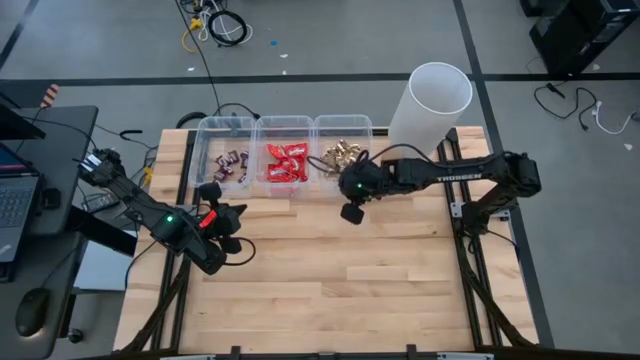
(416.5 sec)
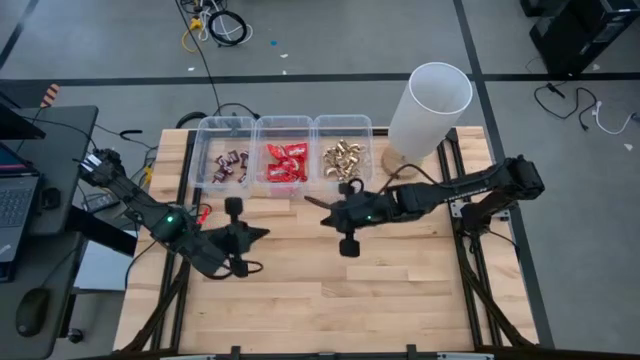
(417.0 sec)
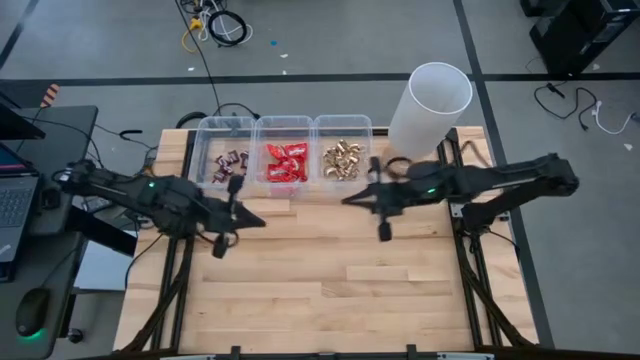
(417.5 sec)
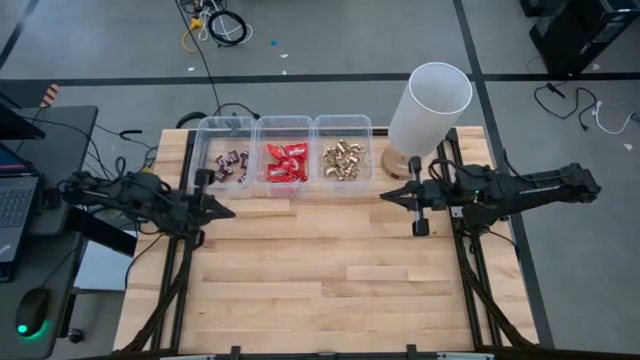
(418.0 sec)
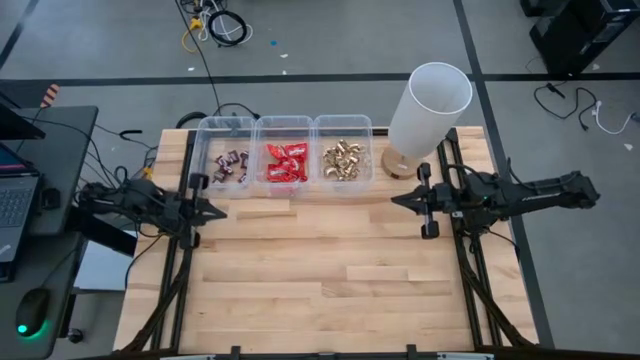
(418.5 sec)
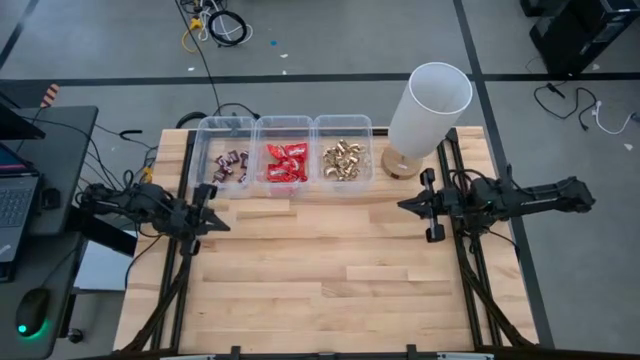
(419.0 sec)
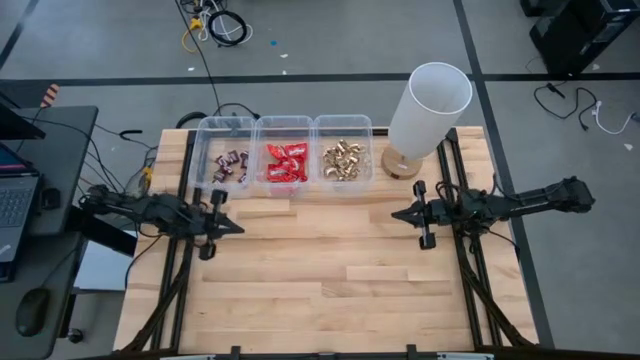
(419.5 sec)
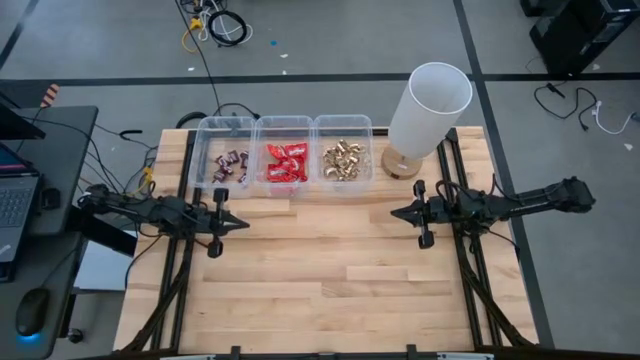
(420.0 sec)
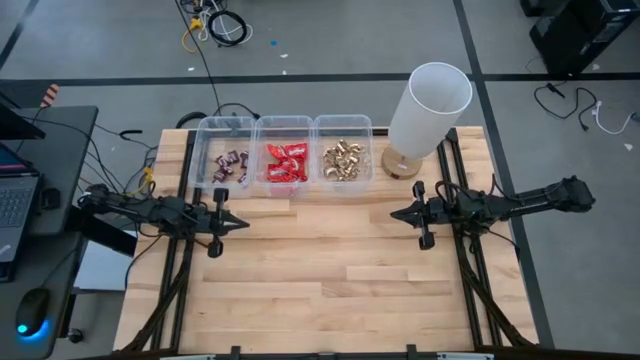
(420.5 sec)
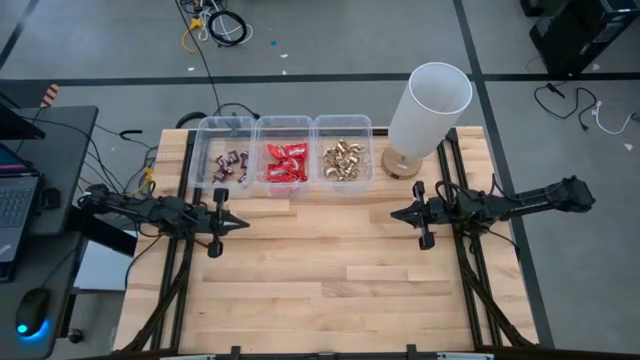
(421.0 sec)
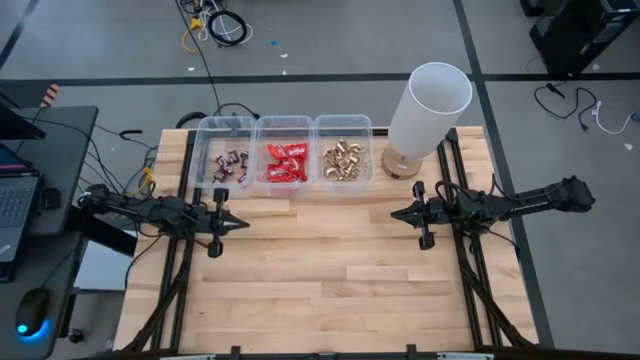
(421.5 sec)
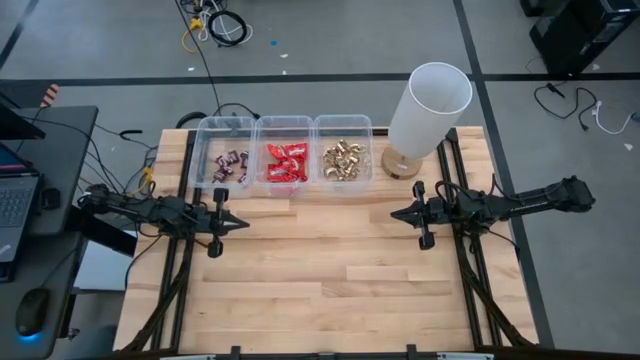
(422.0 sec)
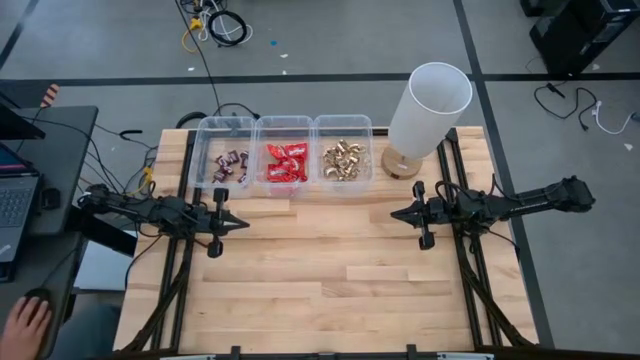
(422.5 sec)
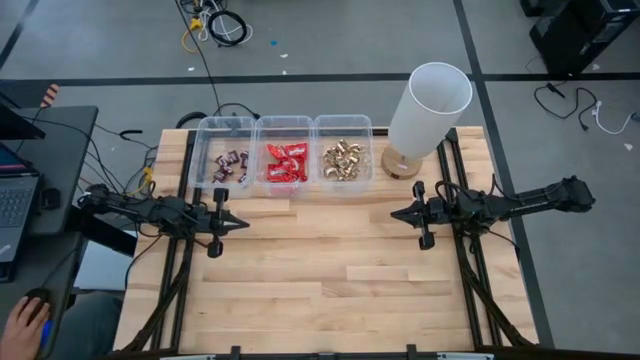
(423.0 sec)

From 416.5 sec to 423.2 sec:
Task: Sort candy
Return to Home Position

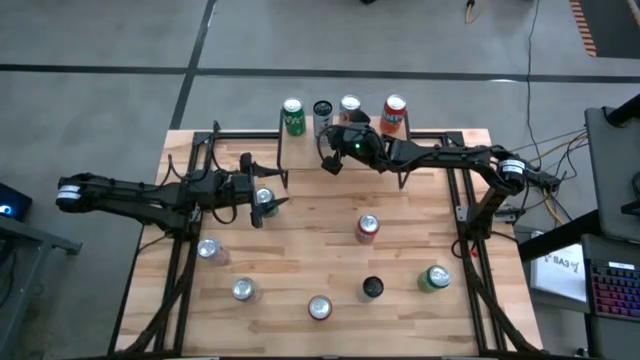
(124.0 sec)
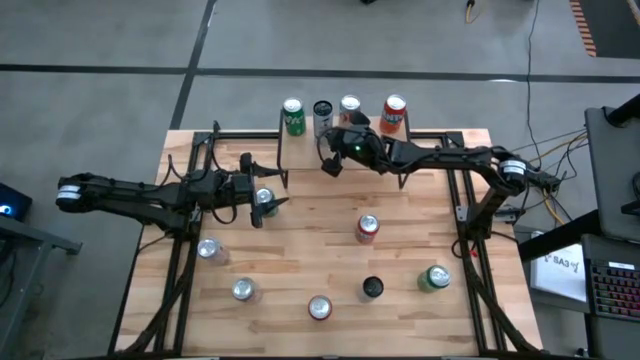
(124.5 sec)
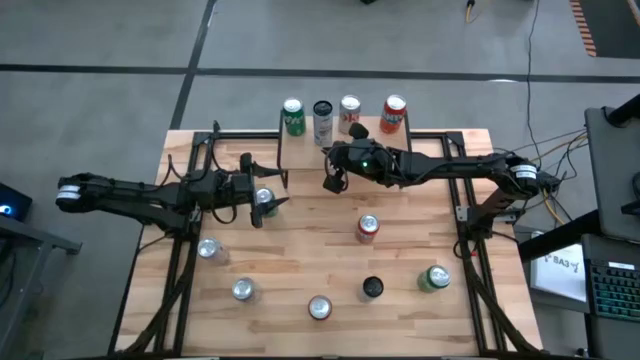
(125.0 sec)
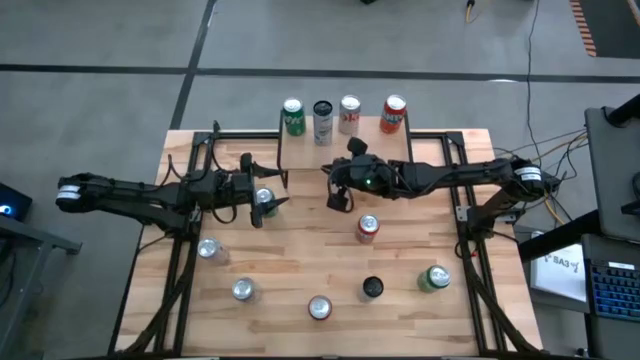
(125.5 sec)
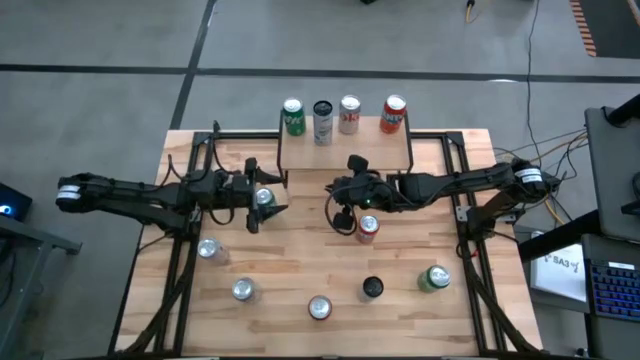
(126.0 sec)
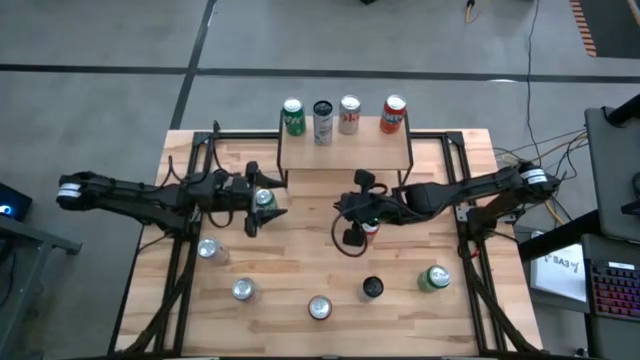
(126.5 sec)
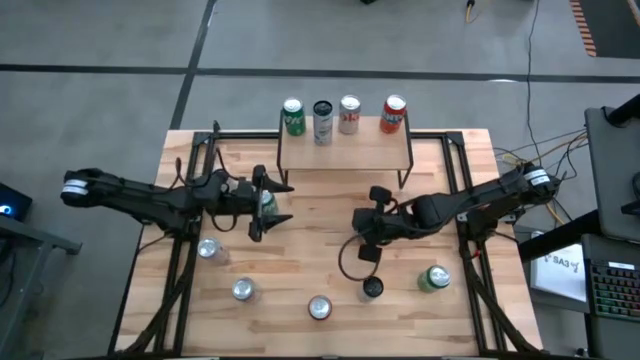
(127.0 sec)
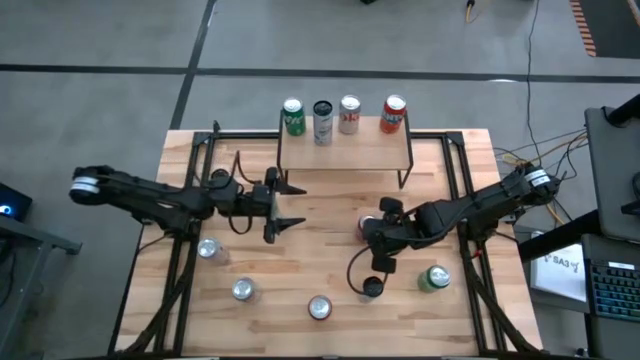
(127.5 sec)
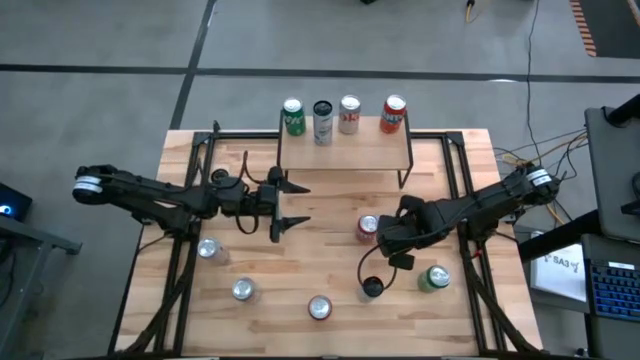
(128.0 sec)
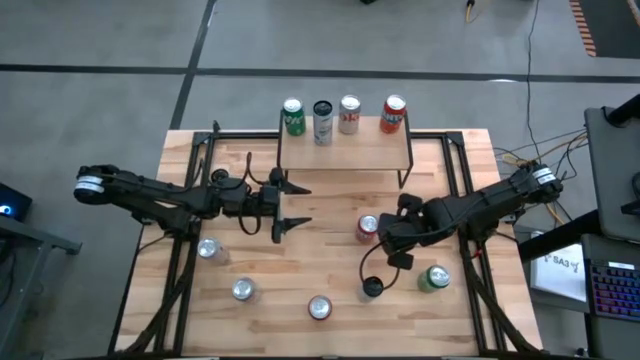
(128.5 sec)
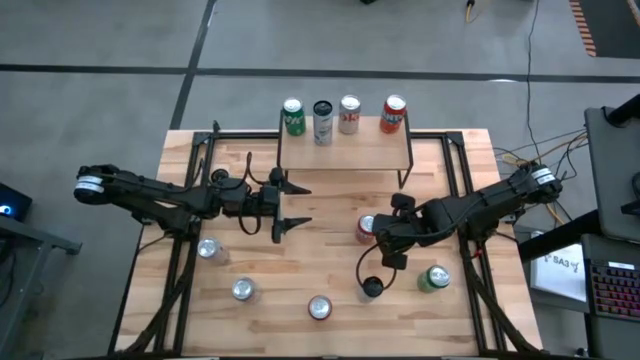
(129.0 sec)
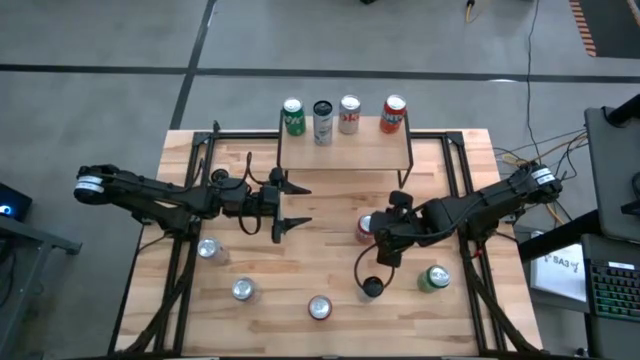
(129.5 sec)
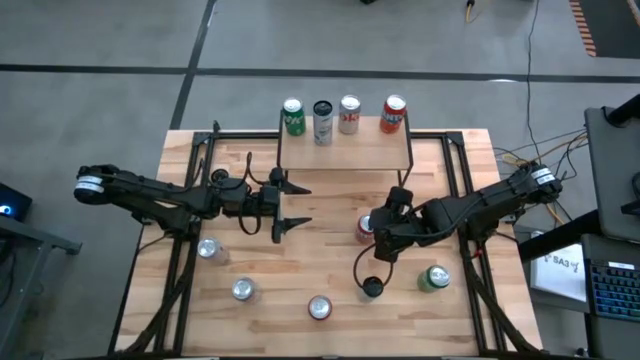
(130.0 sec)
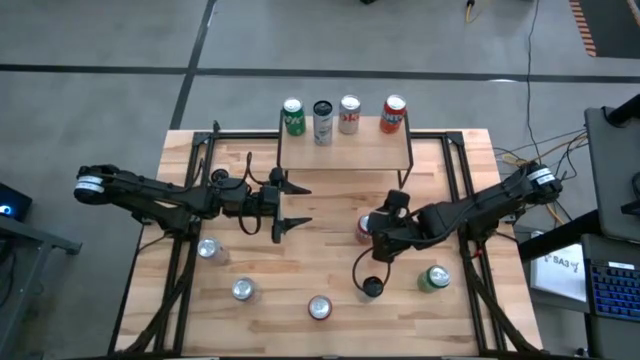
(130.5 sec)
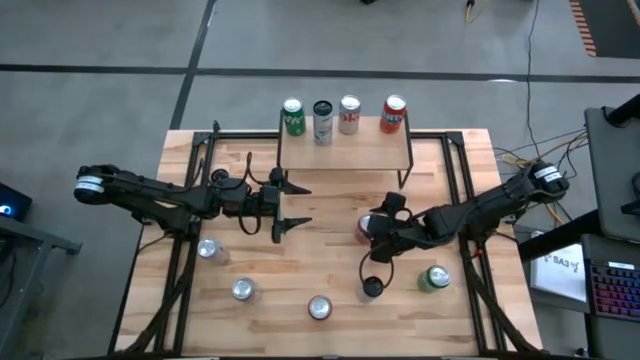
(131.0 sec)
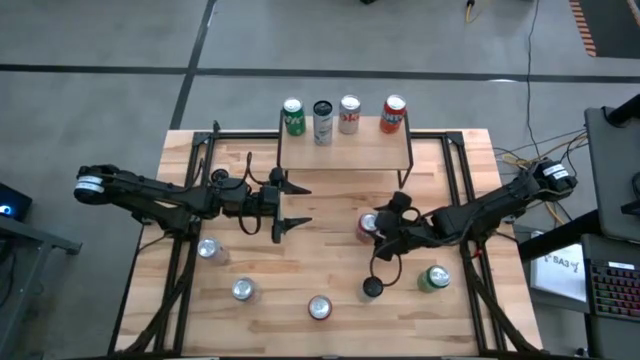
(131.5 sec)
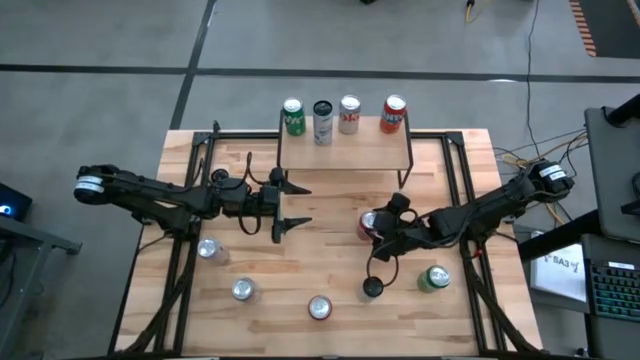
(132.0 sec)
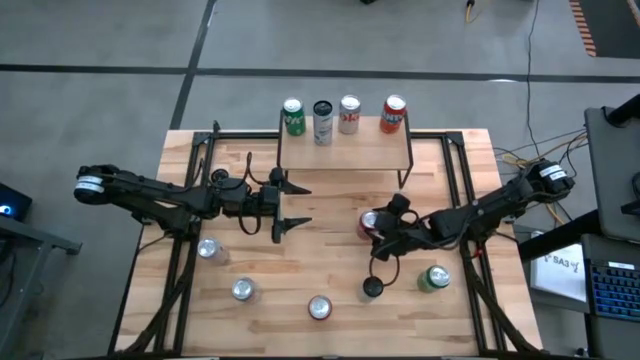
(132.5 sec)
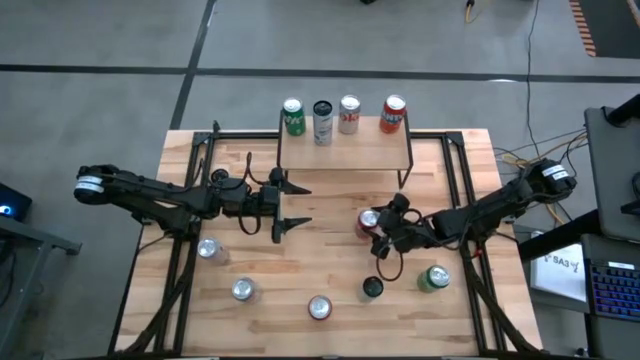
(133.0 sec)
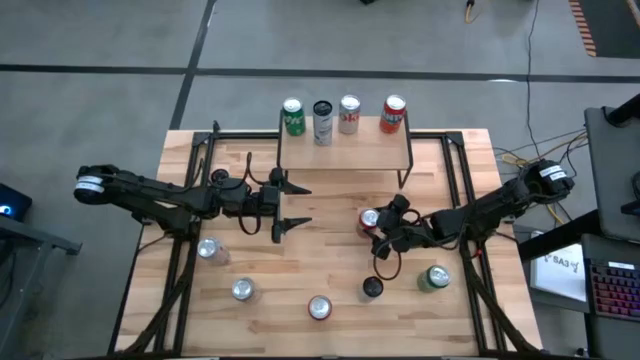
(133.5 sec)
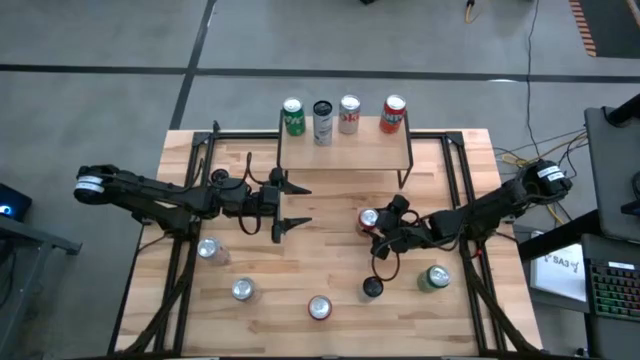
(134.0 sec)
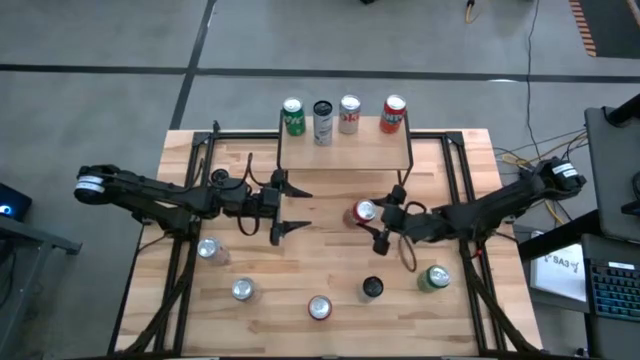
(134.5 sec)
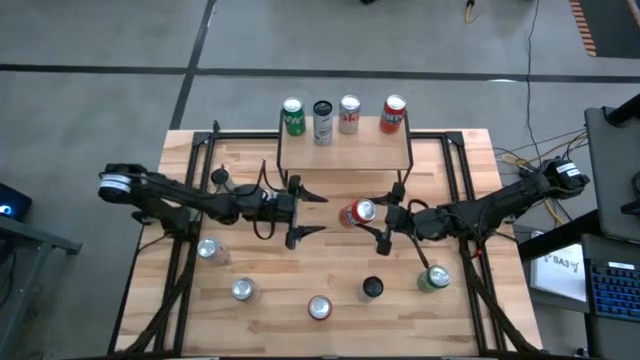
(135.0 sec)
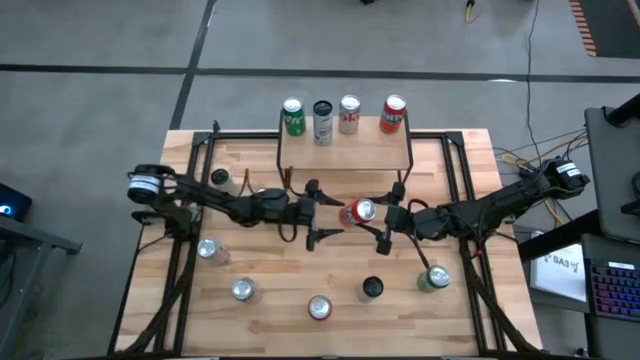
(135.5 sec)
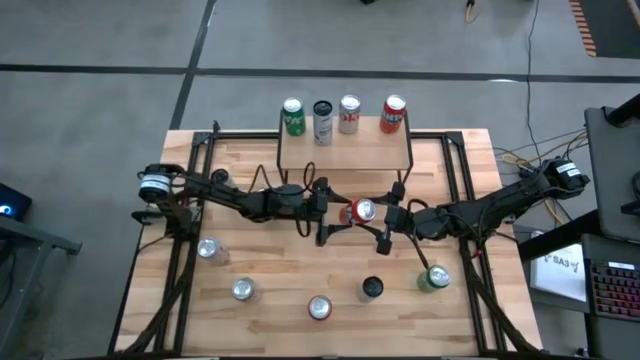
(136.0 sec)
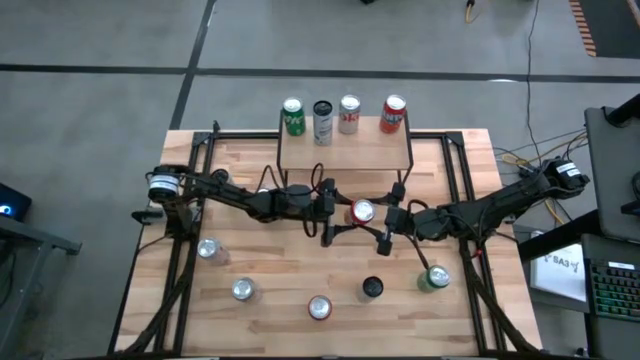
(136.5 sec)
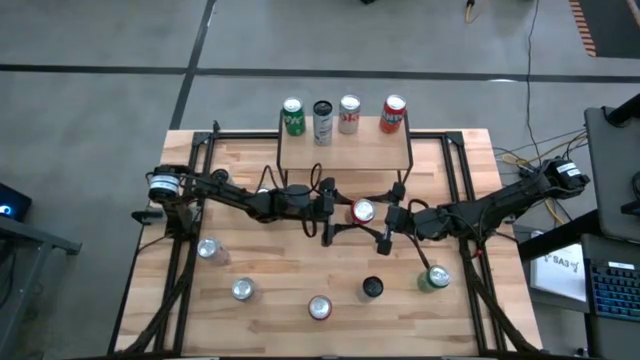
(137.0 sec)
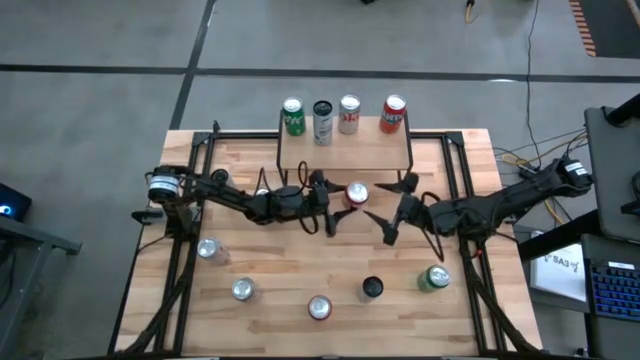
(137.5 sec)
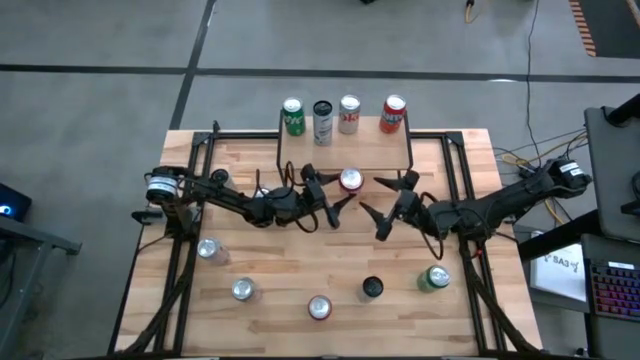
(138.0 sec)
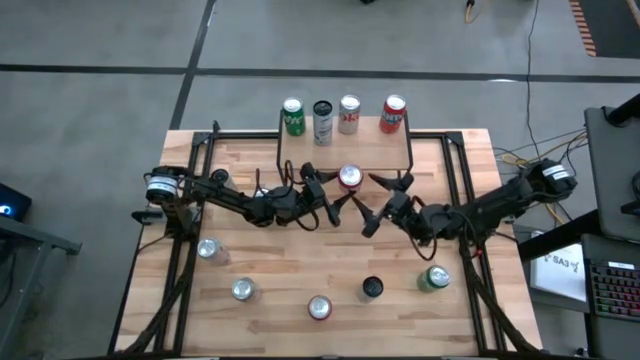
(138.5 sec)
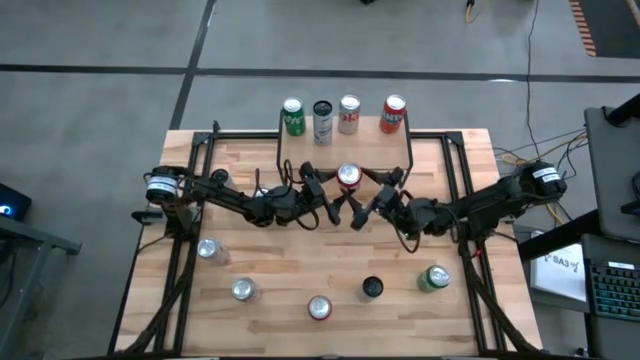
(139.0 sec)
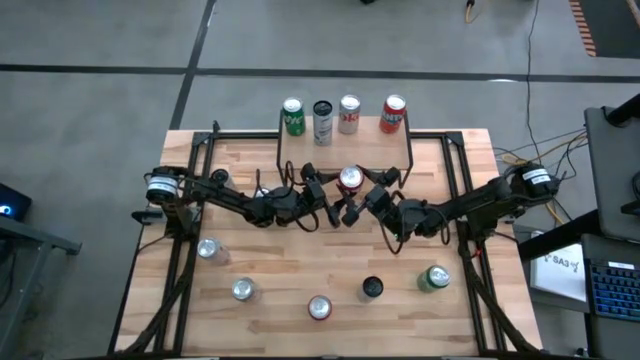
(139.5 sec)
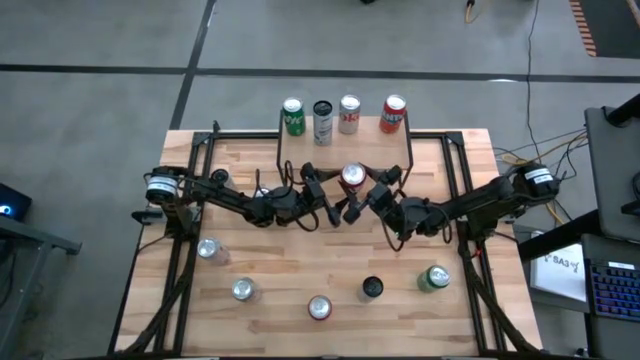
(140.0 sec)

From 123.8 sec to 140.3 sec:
Task: Place canned beverage on shelf
Put the top orange soda can on the shelf aligned with the other orange soda can
